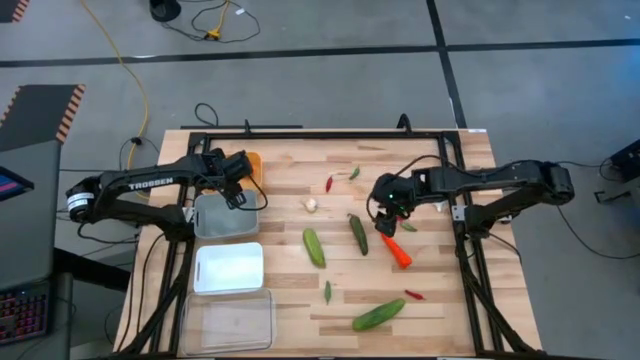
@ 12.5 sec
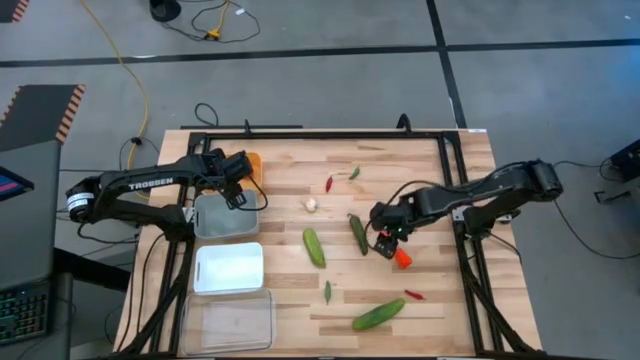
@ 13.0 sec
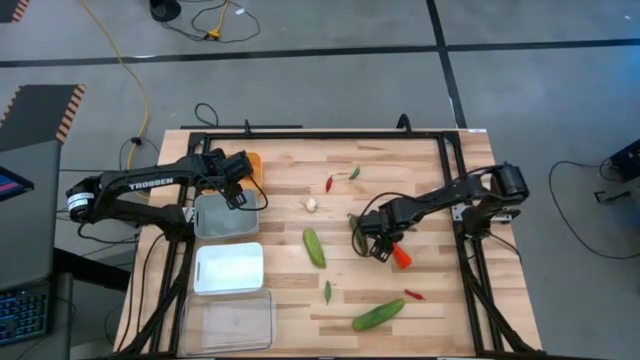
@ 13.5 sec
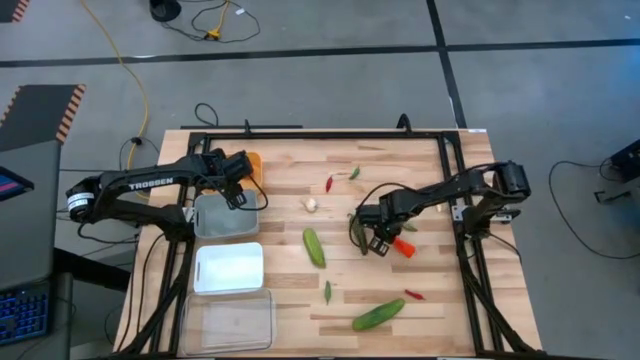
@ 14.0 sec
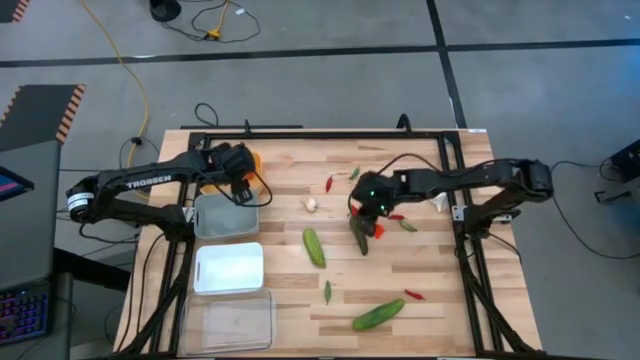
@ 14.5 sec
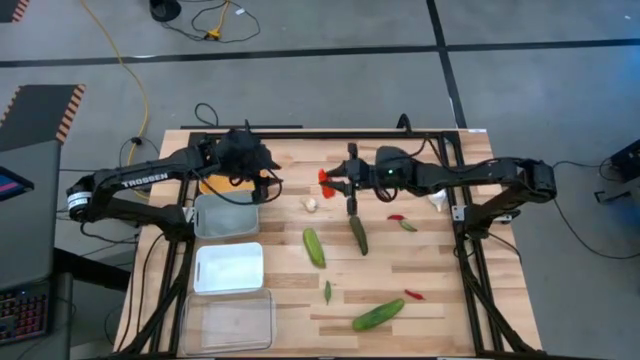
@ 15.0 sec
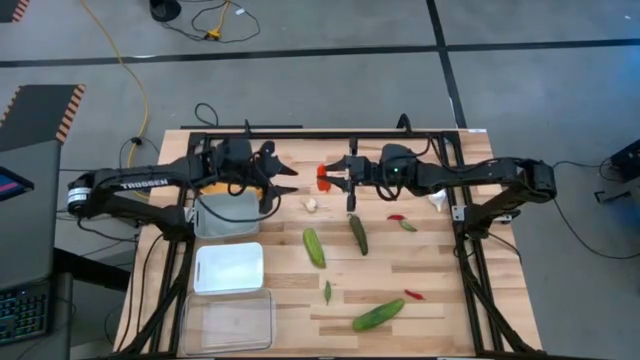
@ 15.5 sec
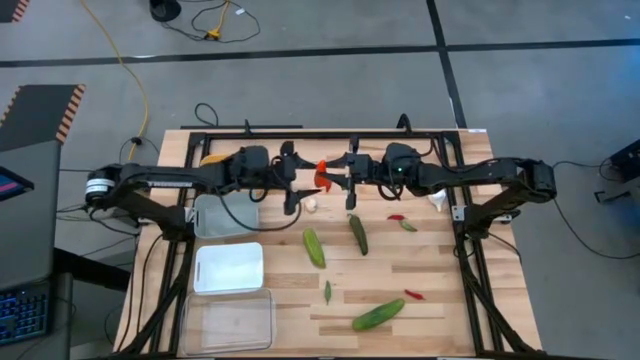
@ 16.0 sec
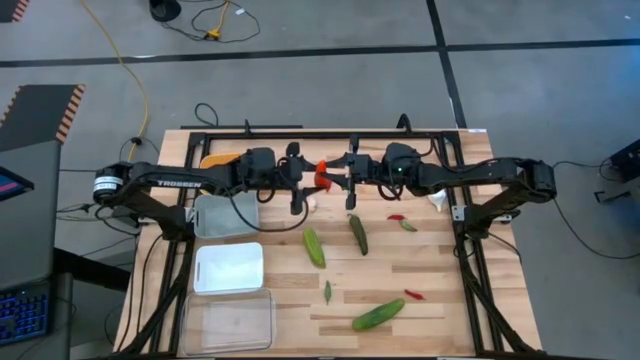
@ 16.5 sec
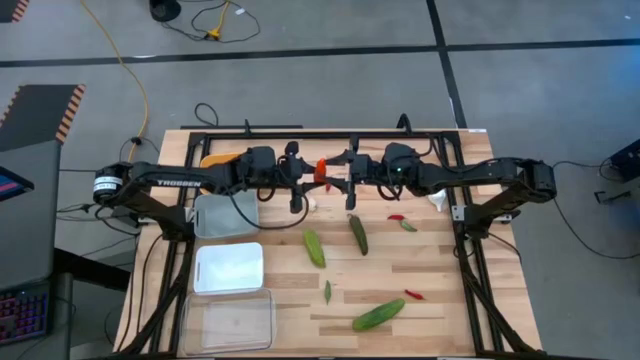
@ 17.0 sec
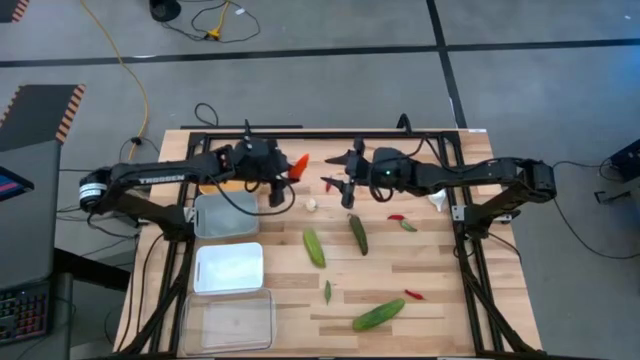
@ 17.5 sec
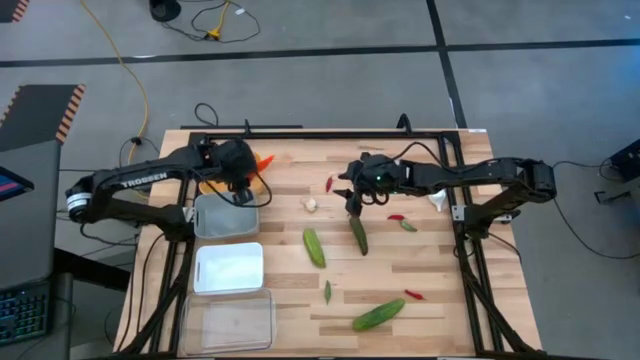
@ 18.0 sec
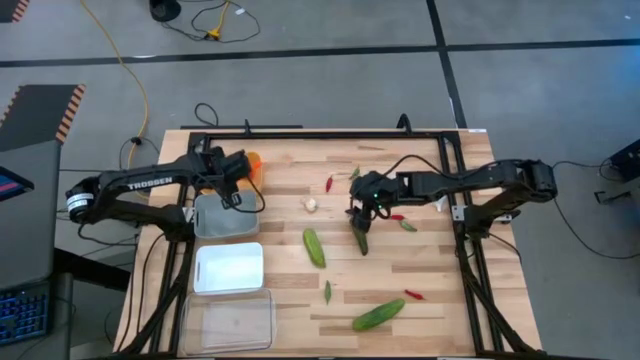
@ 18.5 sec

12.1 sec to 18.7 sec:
Task: Sort produce into baskets
Put the carrot into the orange bin

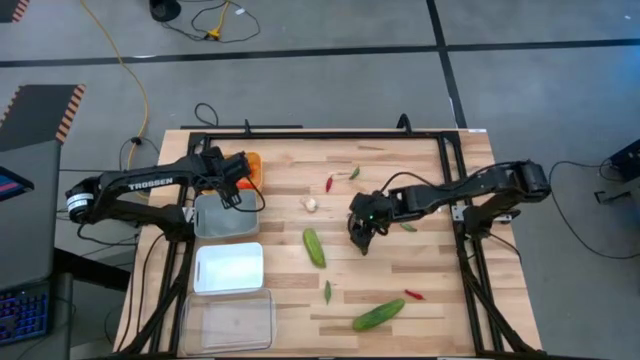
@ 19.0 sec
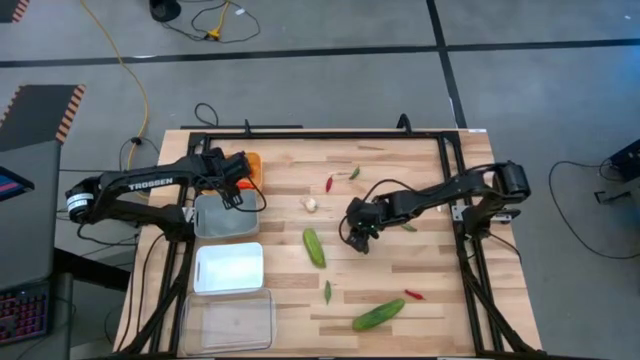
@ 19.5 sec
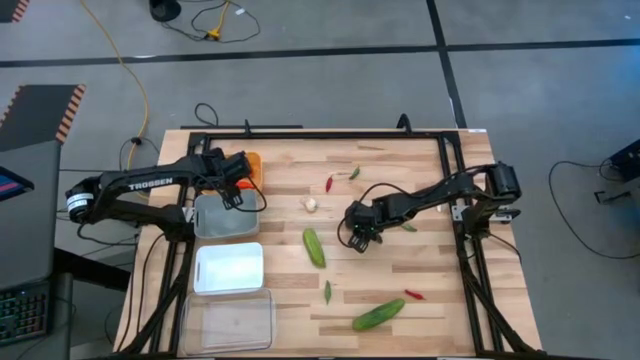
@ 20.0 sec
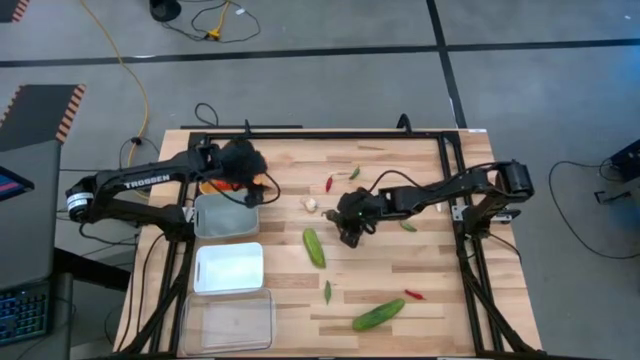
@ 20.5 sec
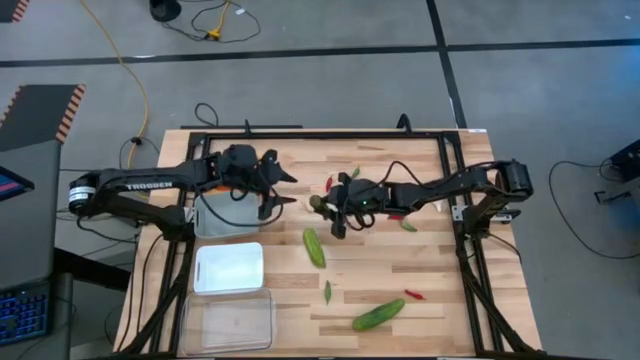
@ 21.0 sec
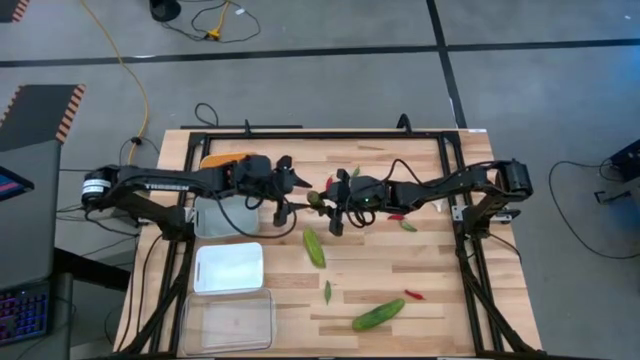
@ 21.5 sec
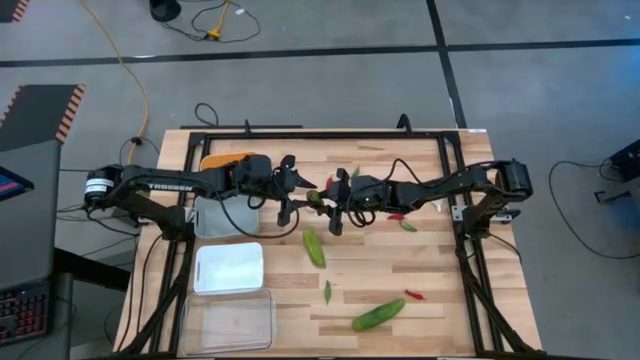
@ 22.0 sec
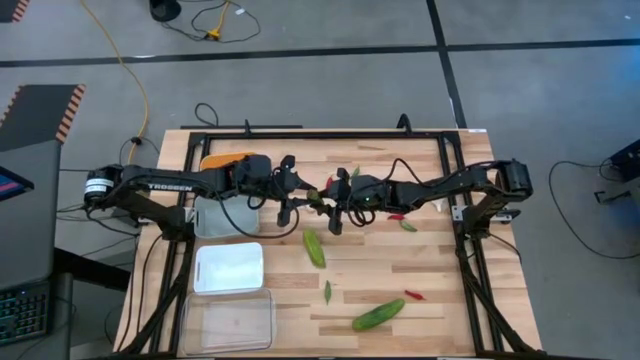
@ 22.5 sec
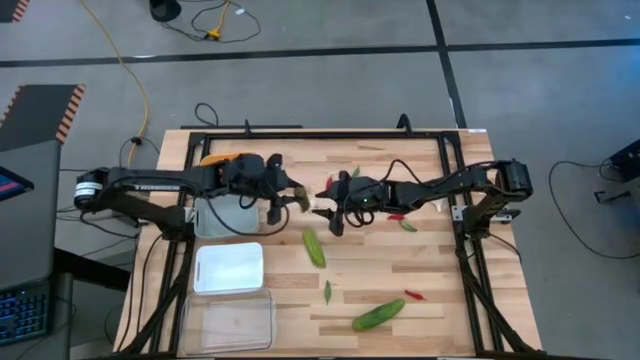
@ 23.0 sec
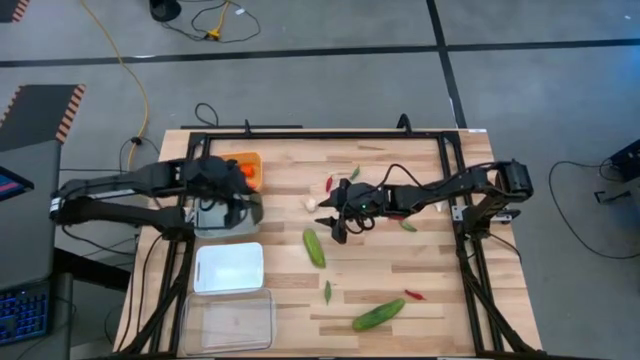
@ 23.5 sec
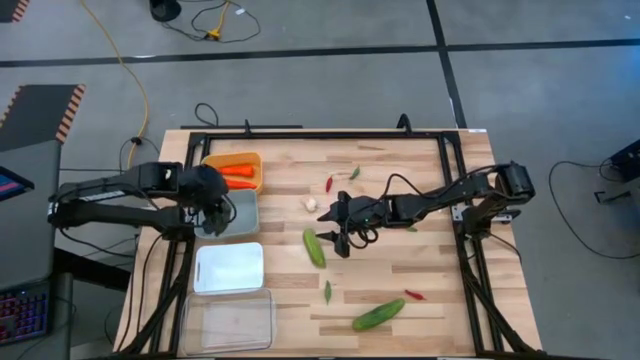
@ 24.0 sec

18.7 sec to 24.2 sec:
Put the green bell pepper into the gray bin

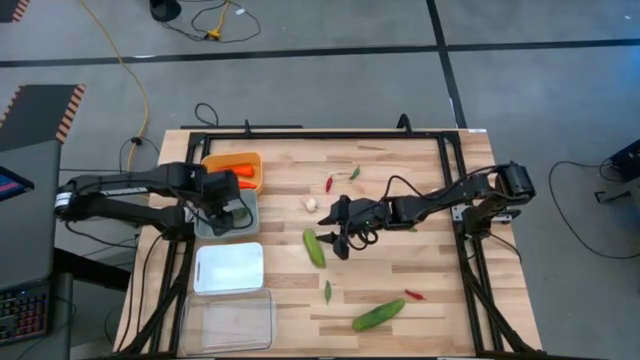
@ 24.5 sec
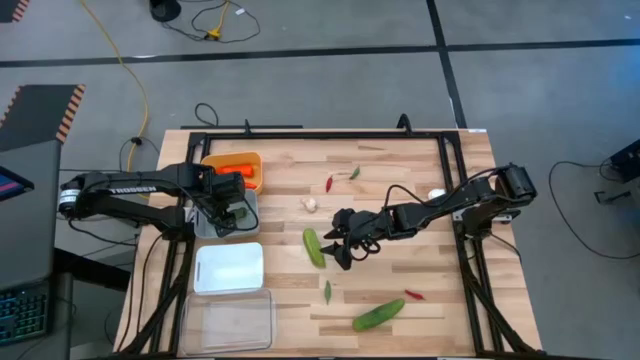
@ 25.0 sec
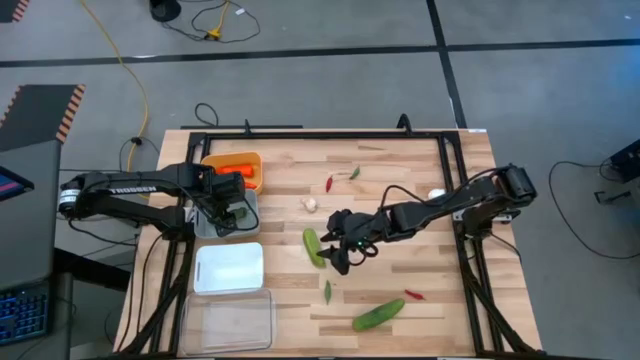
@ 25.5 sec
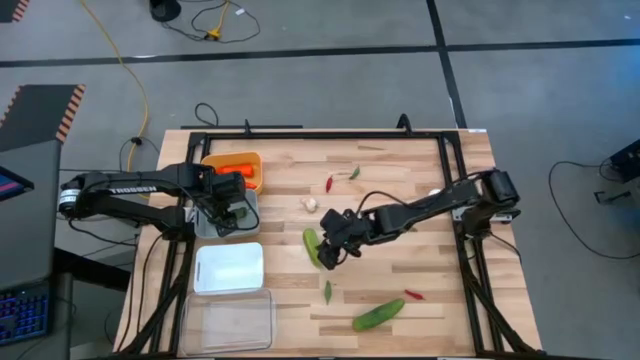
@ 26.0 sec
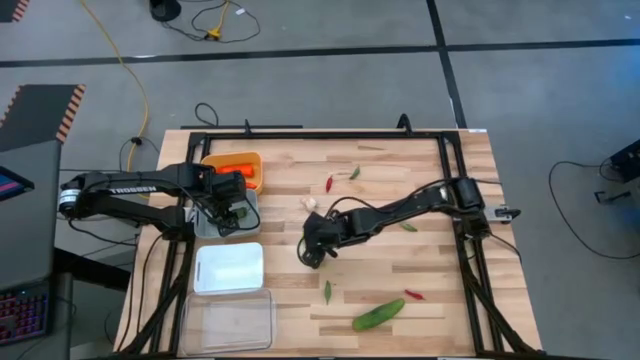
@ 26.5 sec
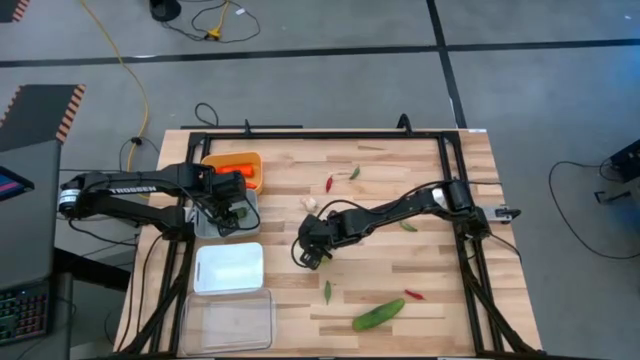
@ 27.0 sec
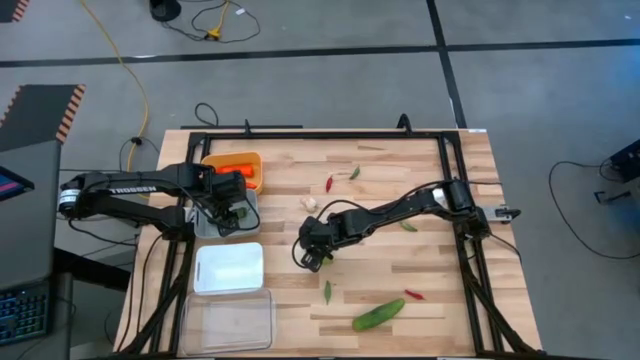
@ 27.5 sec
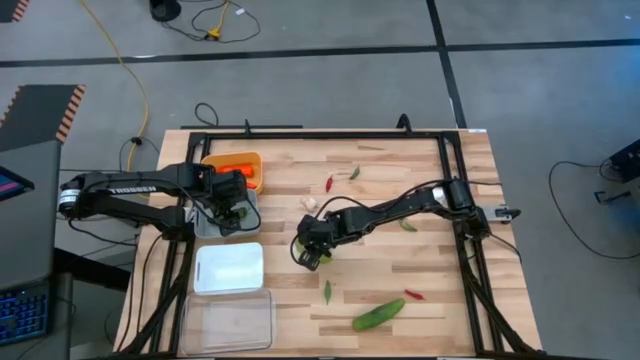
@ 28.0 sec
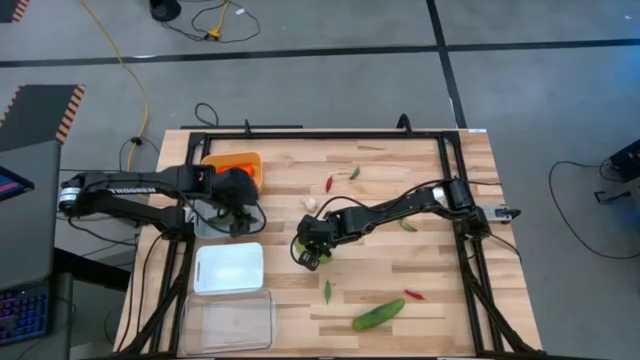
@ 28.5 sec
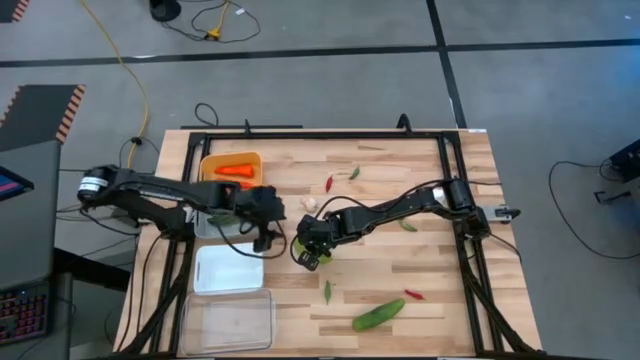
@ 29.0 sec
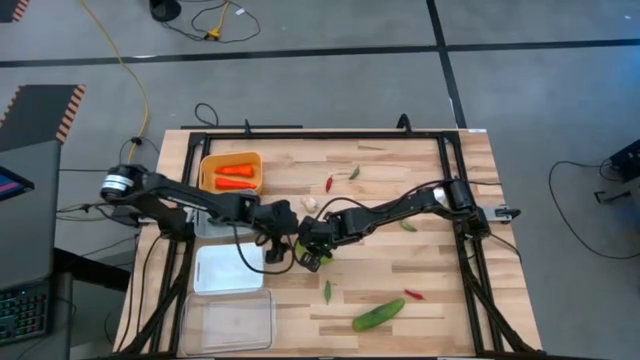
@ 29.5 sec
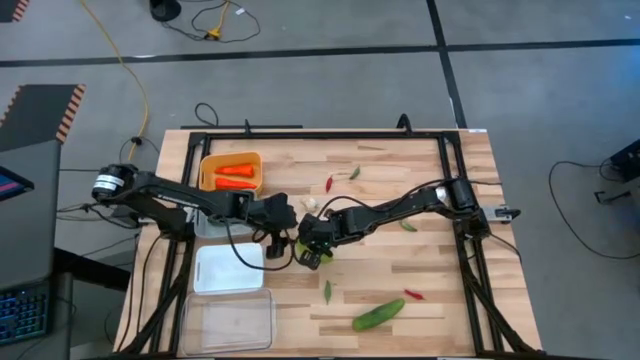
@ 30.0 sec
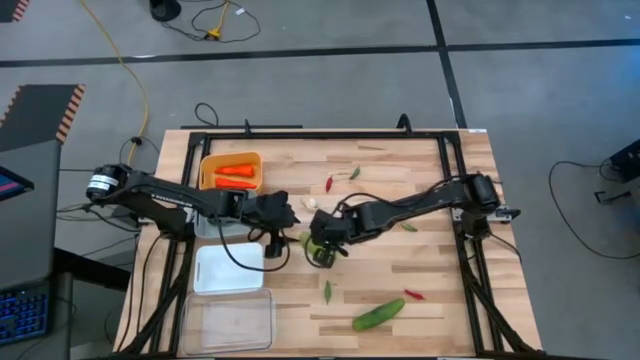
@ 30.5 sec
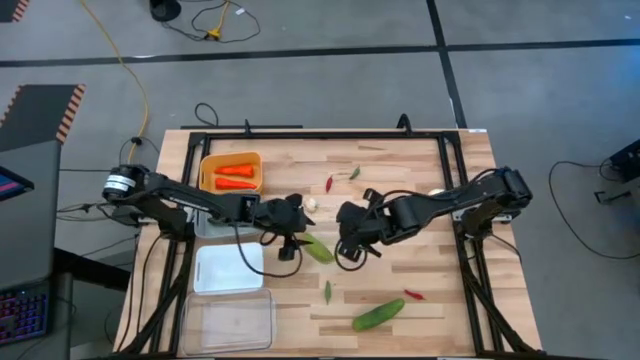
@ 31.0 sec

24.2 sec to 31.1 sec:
Put the top cucumber into the white bin

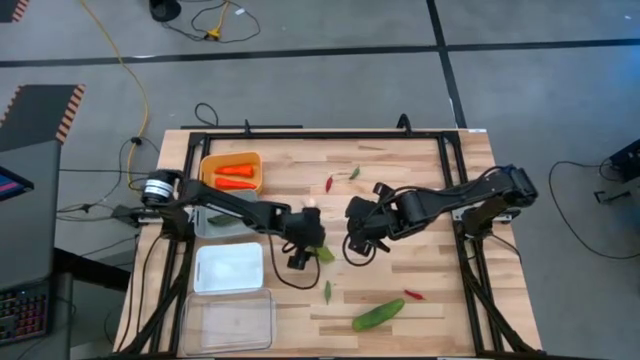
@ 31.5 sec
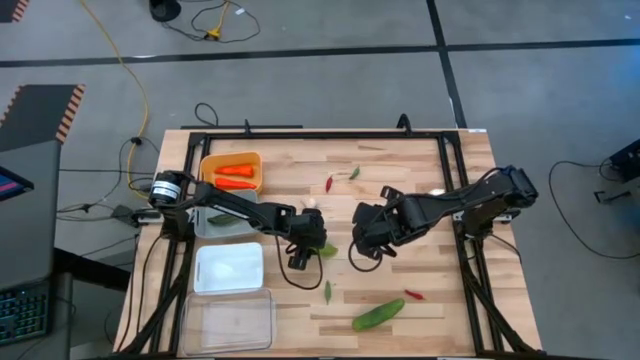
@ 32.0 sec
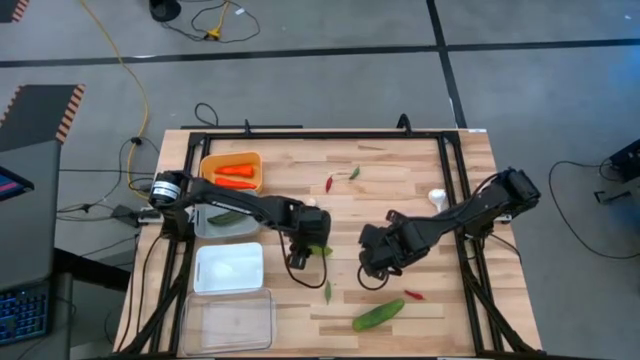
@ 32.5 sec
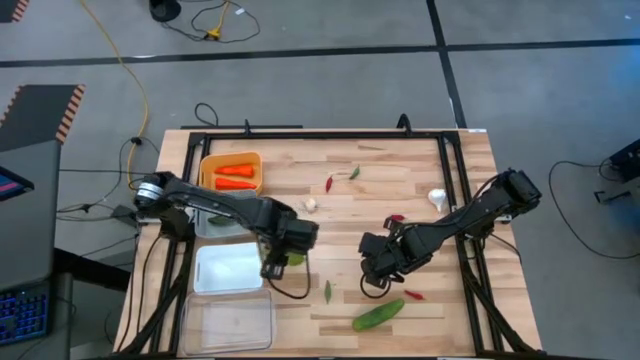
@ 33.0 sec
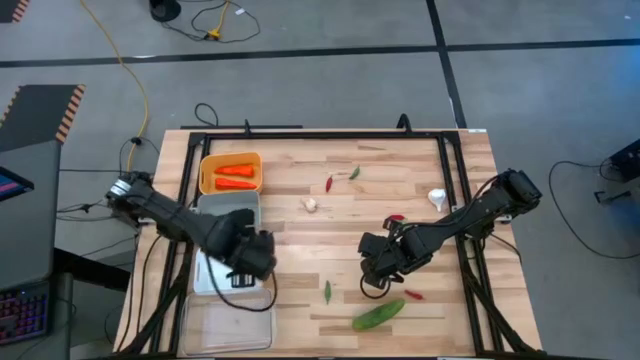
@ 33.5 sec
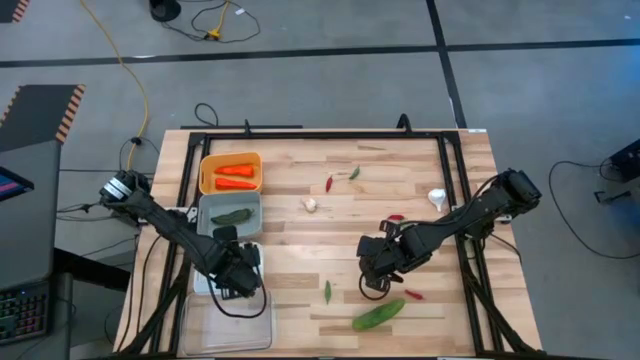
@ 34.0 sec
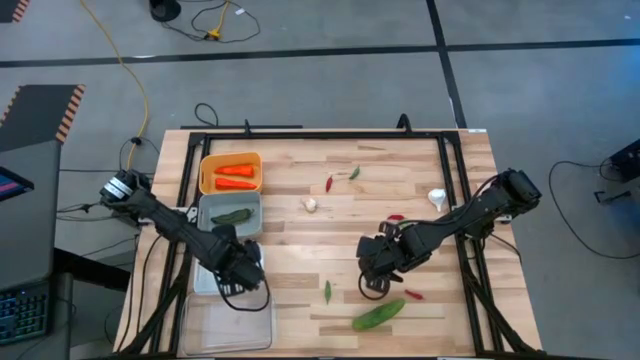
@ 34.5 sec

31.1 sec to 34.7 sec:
Put the top cucumber into the white bin
